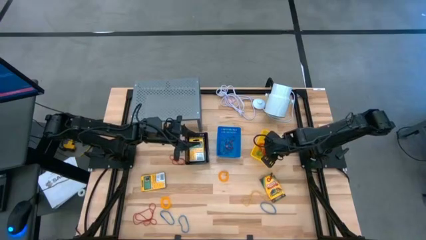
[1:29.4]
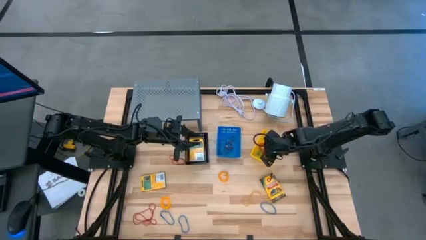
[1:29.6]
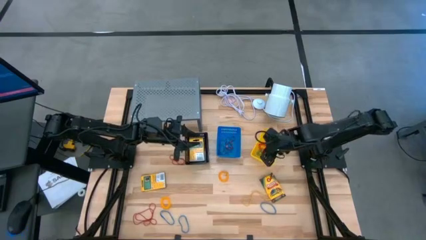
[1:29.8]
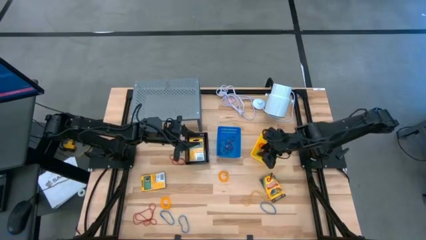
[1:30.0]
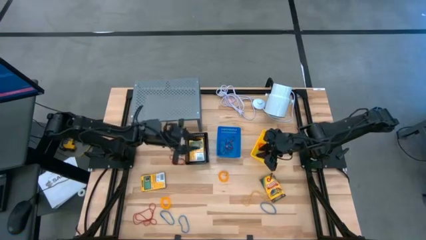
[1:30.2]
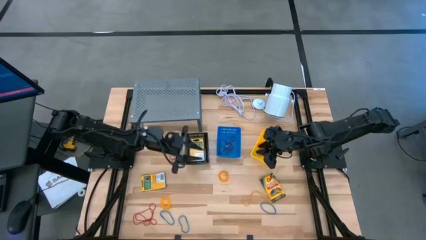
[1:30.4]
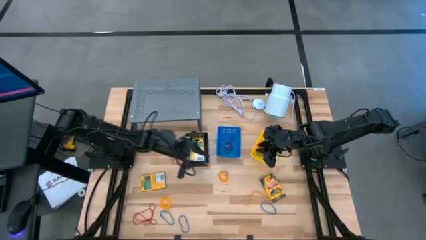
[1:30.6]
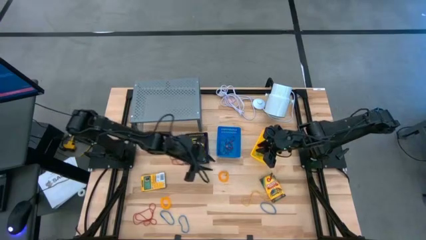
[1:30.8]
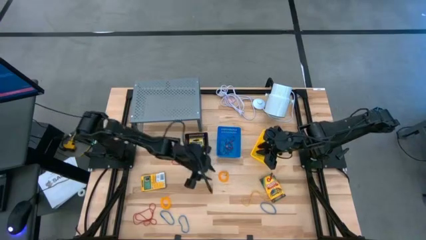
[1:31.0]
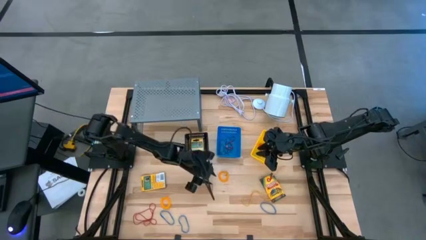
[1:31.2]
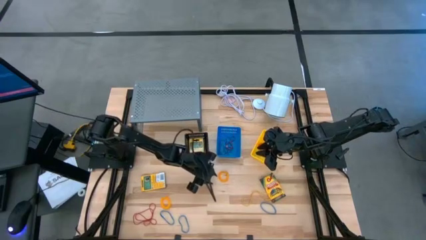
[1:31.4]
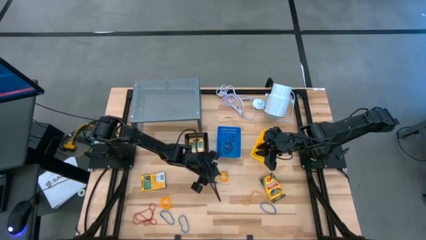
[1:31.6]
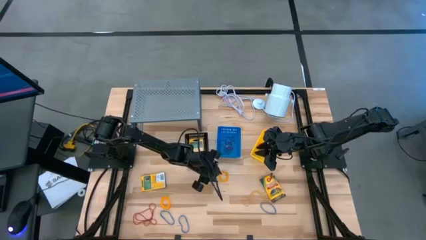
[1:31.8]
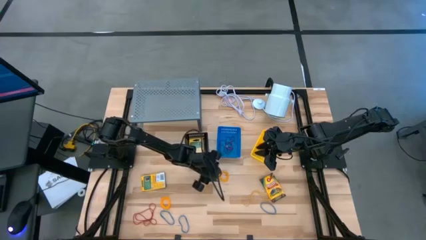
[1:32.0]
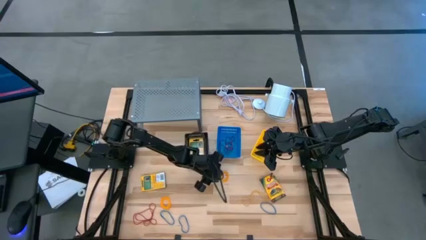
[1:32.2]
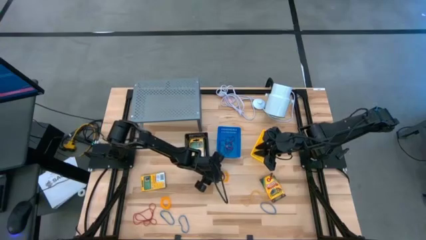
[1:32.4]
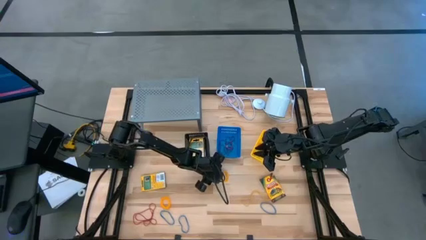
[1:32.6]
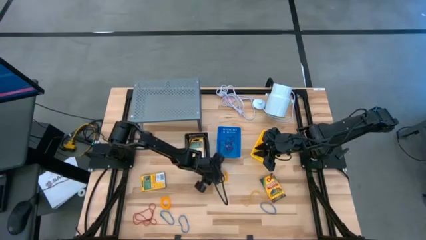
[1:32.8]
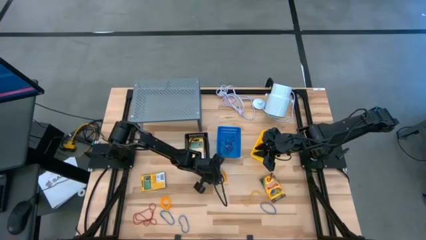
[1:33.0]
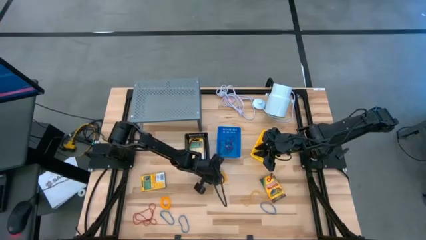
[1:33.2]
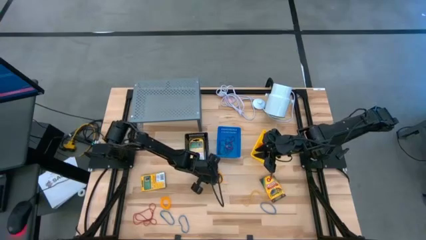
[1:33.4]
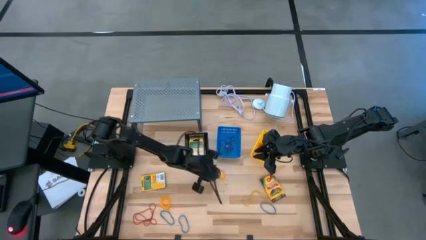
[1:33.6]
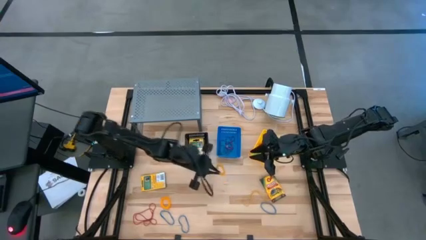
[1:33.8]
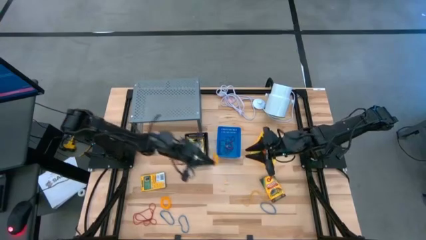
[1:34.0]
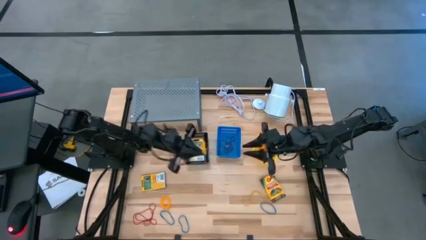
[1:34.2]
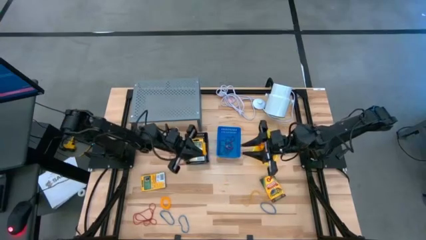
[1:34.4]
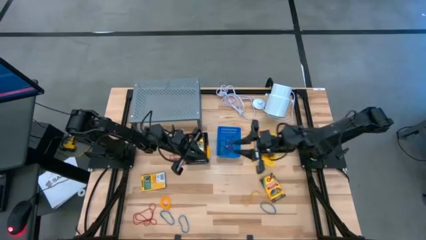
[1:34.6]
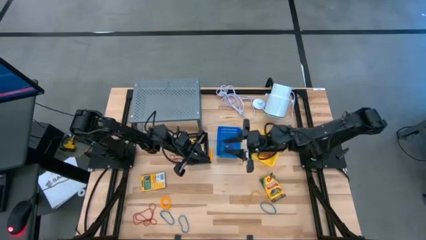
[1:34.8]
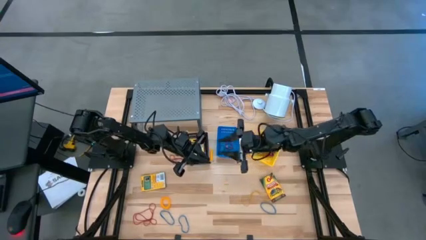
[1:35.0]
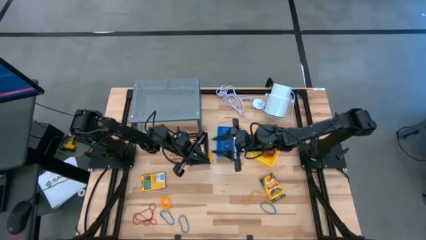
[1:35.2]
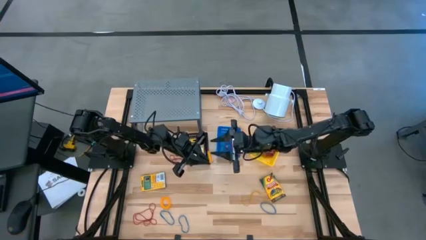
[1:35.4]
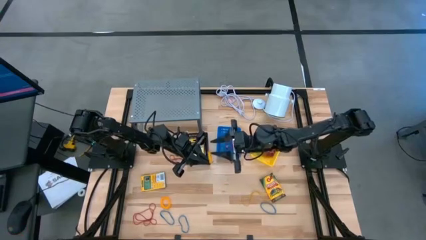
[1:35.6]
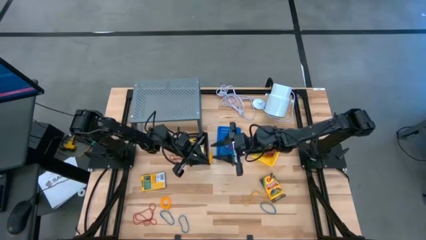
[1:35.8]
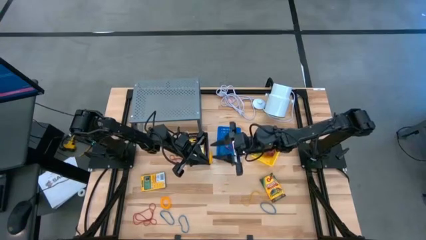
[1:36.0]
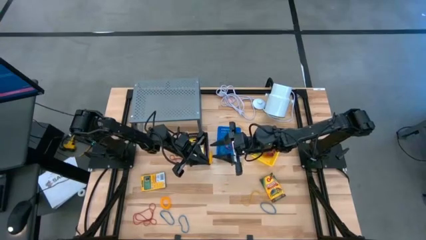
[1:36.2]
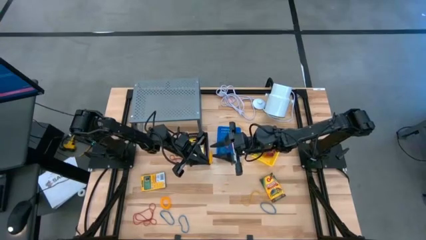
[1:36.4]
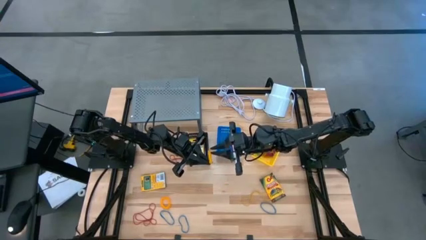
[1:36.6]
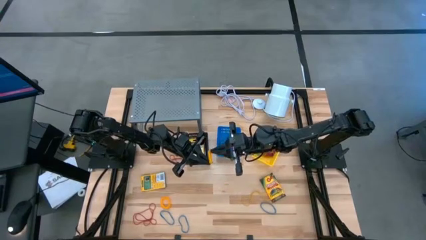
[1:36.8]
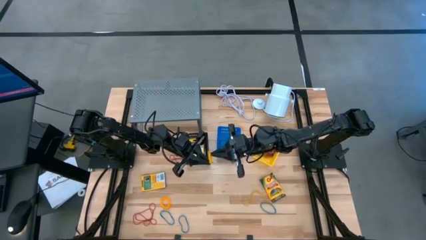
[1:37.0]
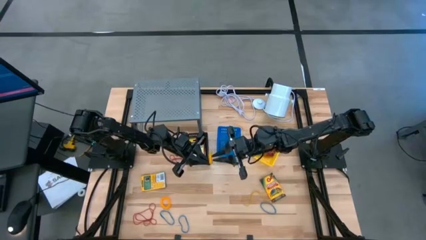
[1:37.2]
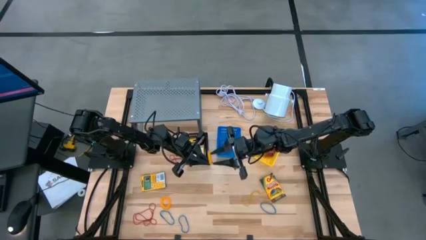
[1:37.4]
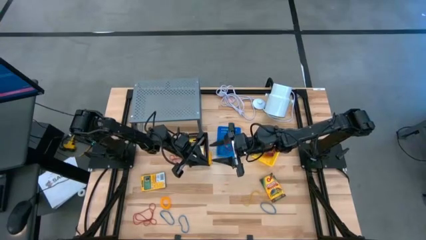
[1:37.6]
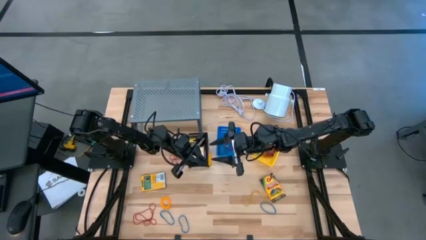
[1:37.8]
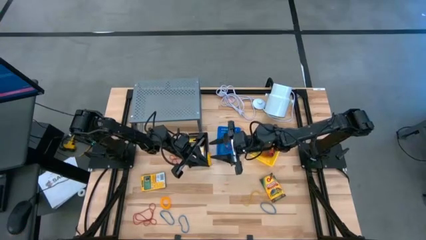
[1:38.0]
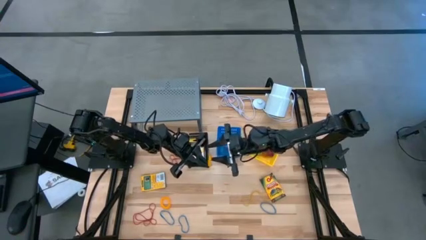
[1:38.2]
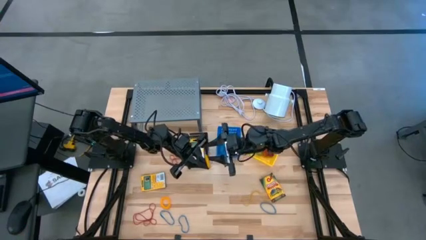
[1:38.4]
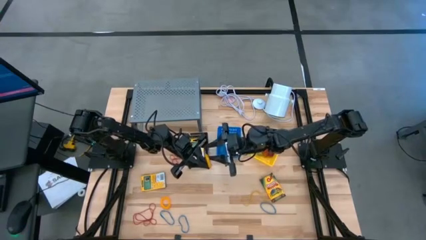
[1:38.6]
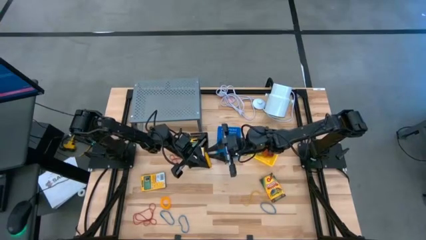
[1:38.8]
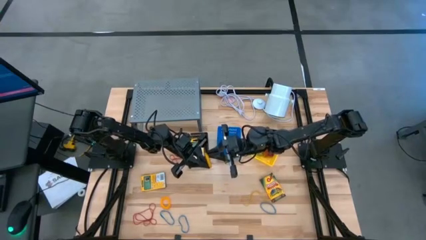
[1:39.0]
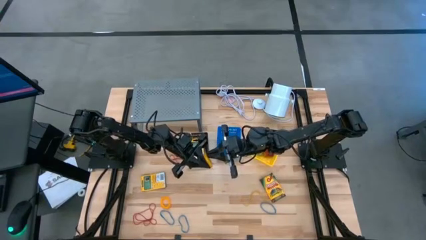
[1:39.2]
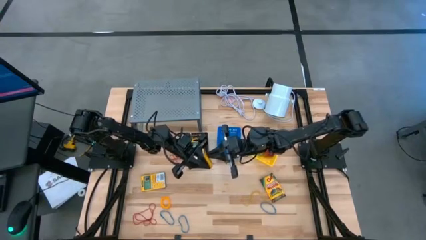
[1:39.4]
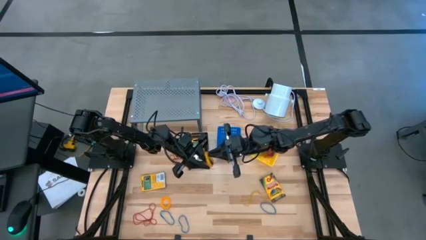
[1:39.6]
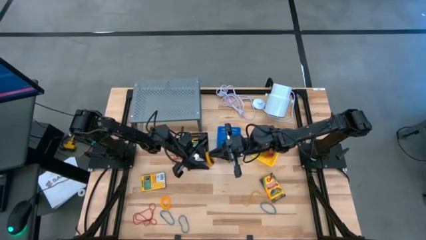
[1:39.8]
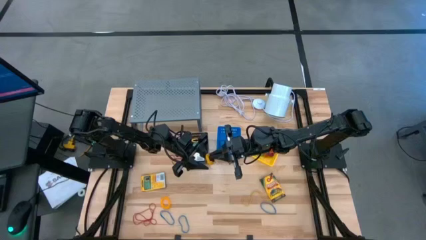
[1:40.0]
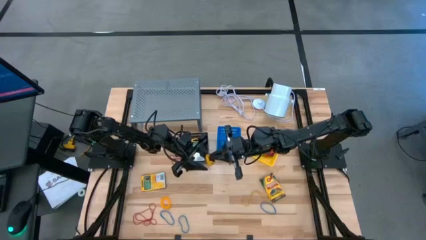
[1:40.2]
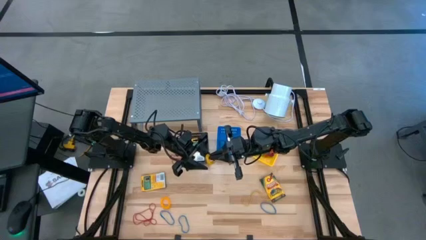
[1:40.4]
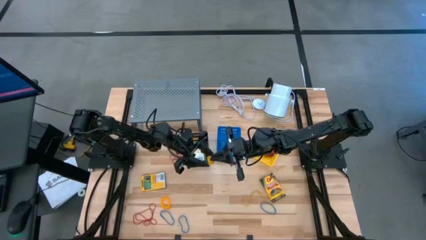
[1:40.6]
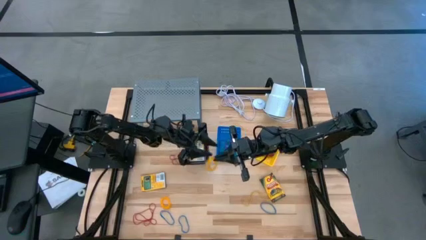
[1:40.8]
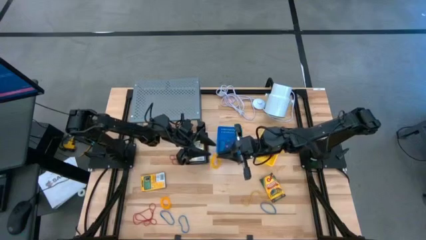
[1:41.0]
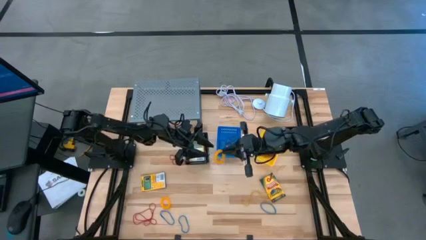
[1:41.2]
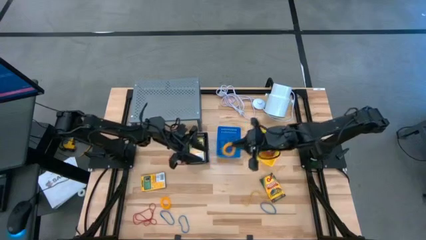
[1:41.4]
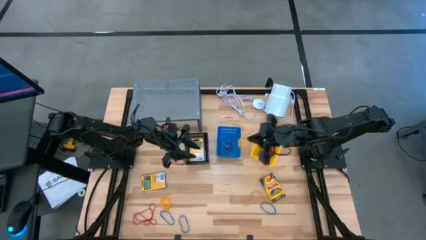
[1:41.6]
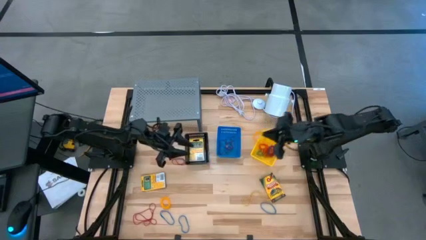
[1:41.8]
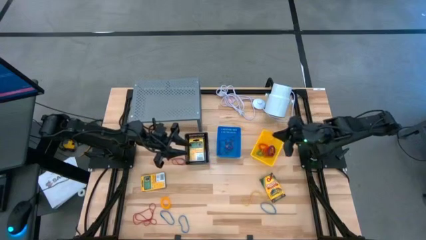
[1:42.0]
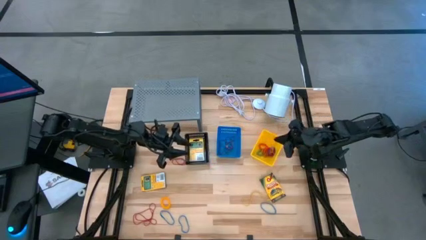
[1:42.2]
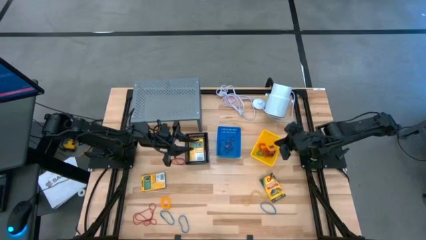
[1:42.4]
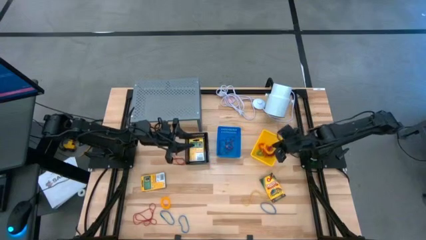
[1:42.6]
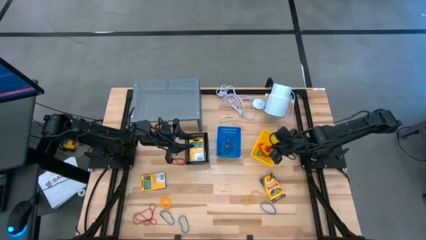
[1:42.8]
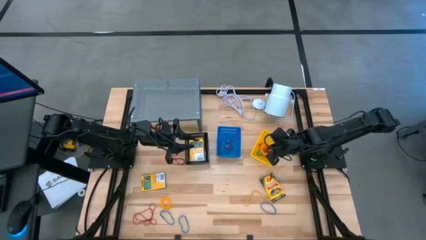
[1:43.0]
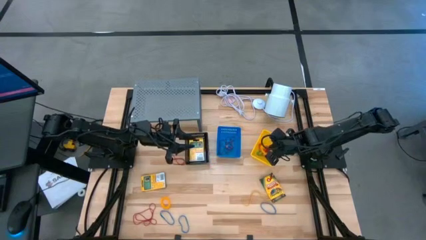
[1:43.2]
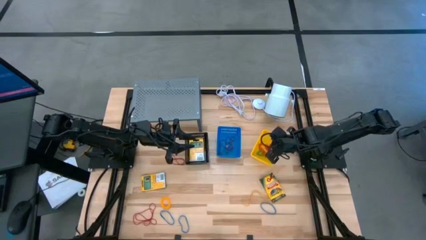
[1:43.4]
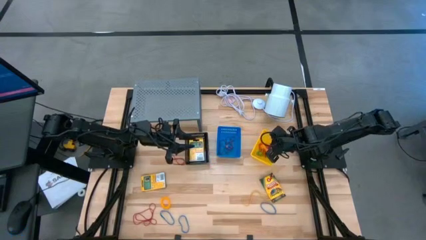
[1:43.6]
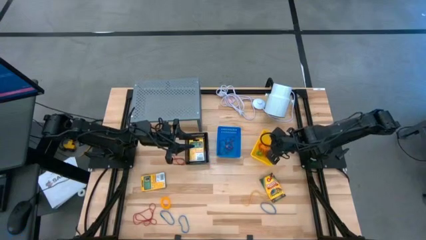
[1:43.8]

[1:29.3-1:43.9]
Task: Pick & Place Office Desk Supplies
Put the yellow stretchable key holder into the yellow basket
